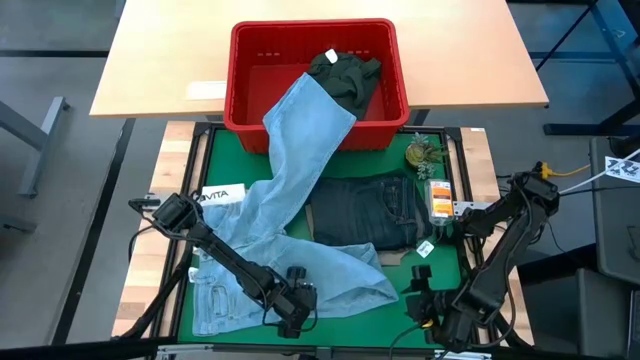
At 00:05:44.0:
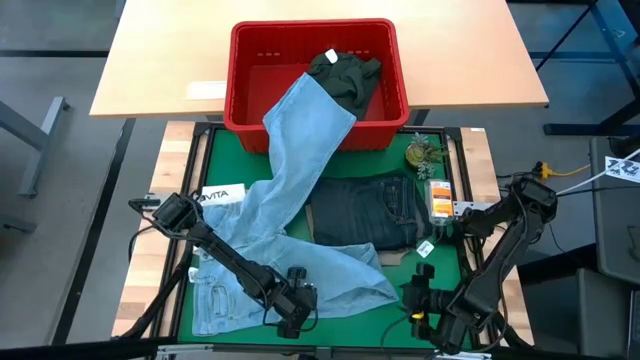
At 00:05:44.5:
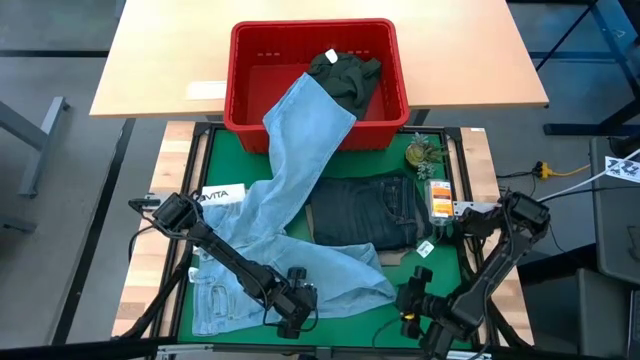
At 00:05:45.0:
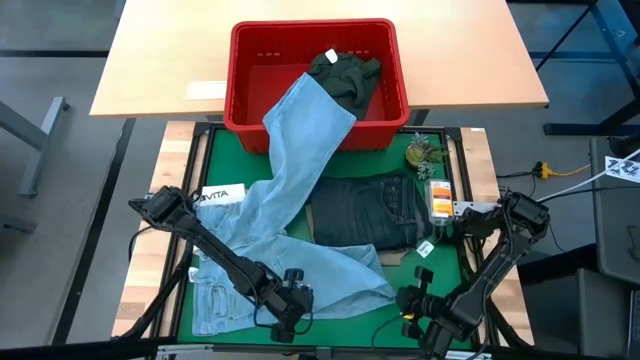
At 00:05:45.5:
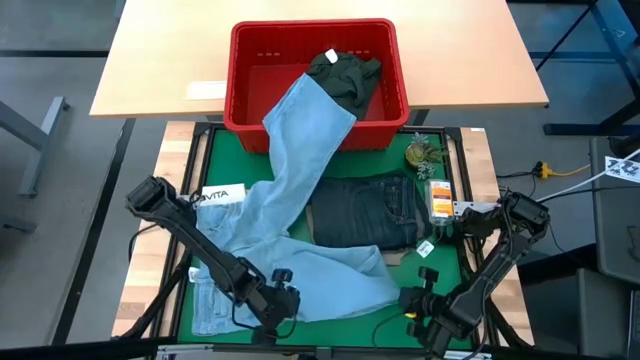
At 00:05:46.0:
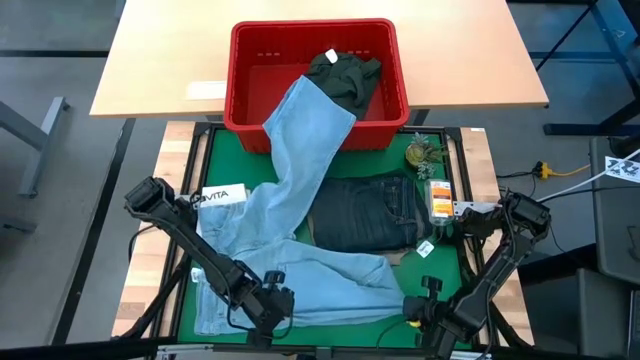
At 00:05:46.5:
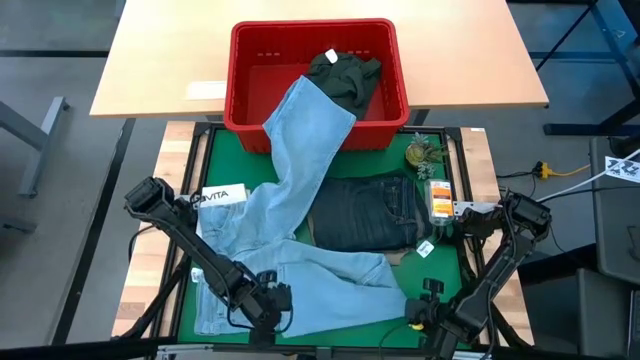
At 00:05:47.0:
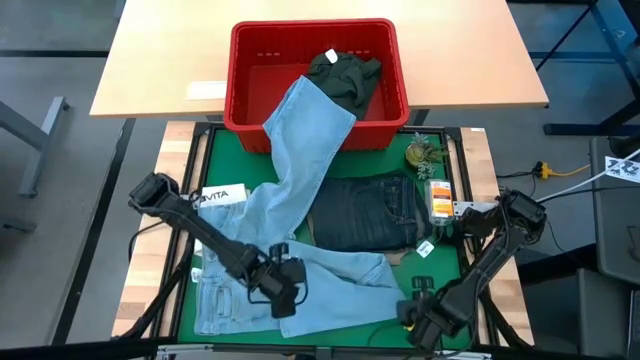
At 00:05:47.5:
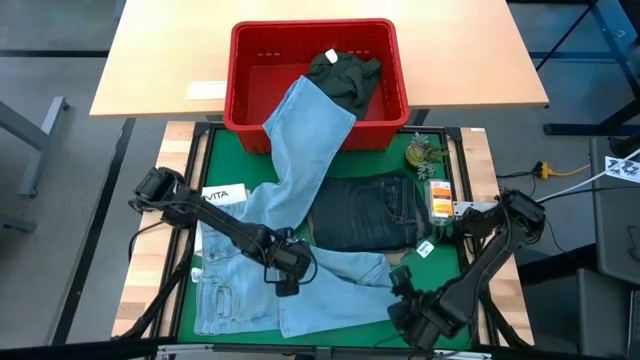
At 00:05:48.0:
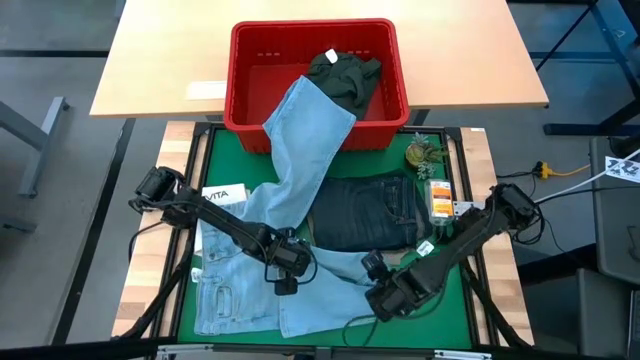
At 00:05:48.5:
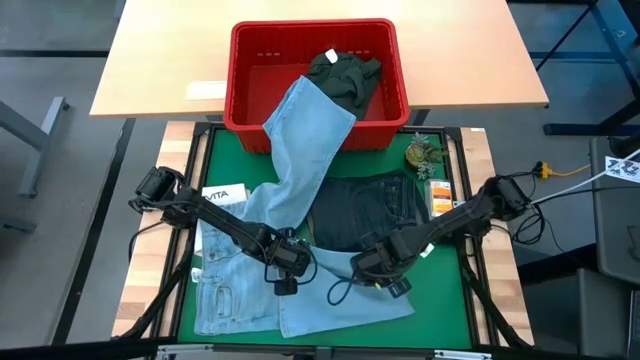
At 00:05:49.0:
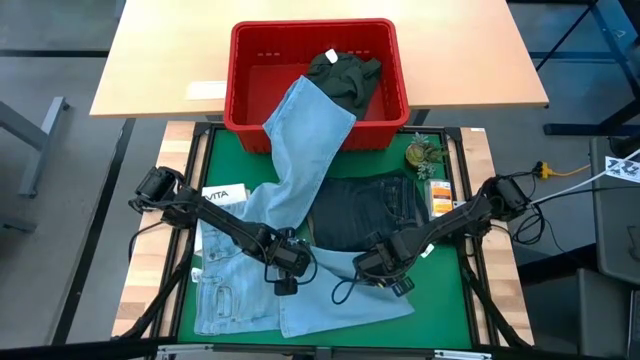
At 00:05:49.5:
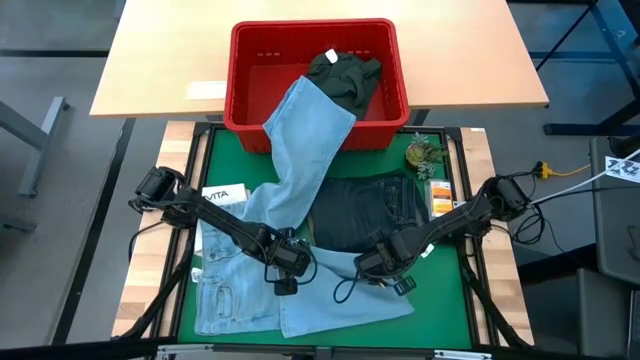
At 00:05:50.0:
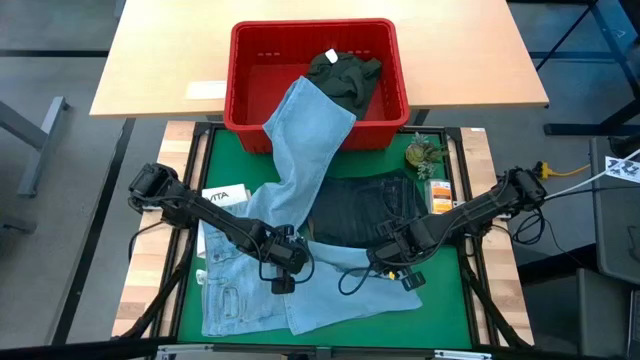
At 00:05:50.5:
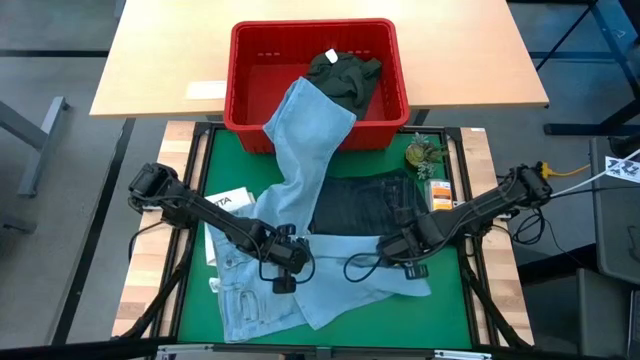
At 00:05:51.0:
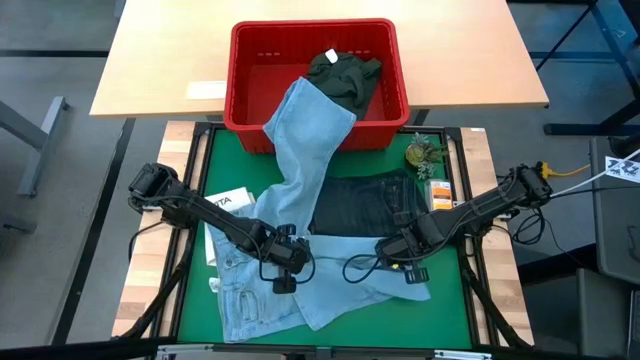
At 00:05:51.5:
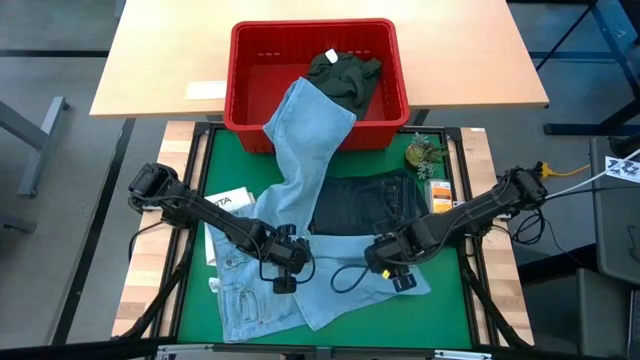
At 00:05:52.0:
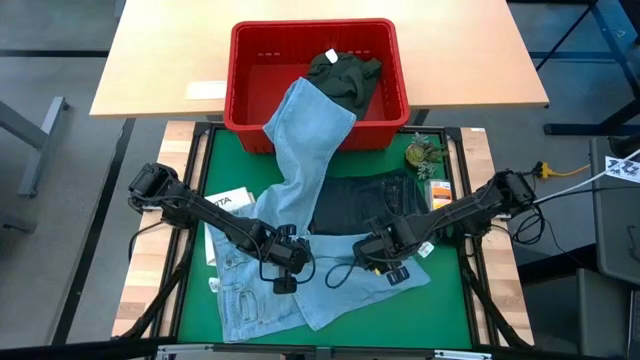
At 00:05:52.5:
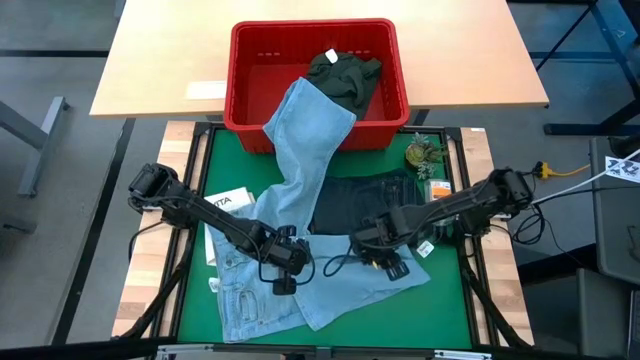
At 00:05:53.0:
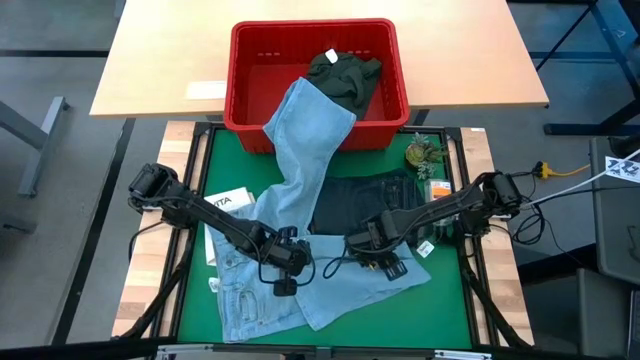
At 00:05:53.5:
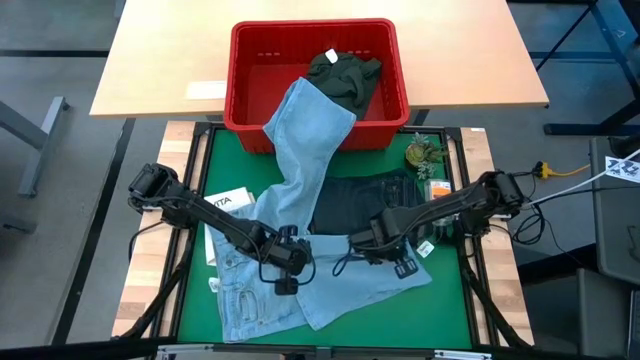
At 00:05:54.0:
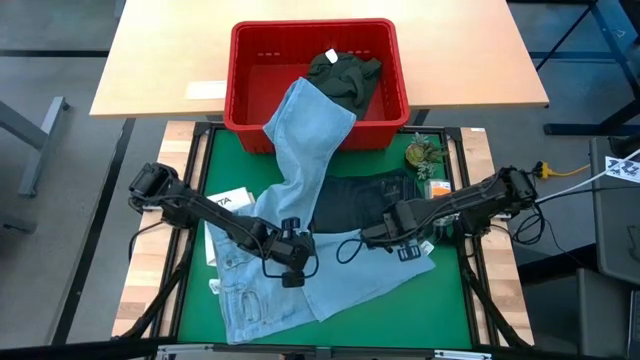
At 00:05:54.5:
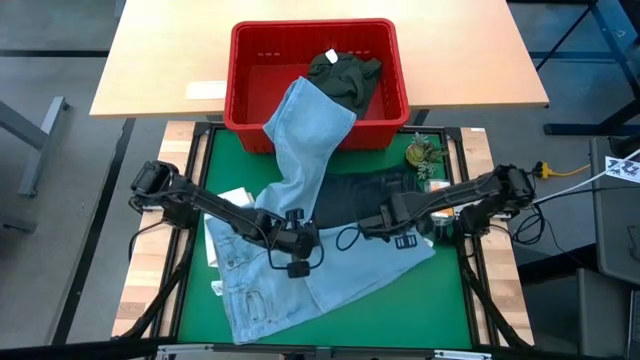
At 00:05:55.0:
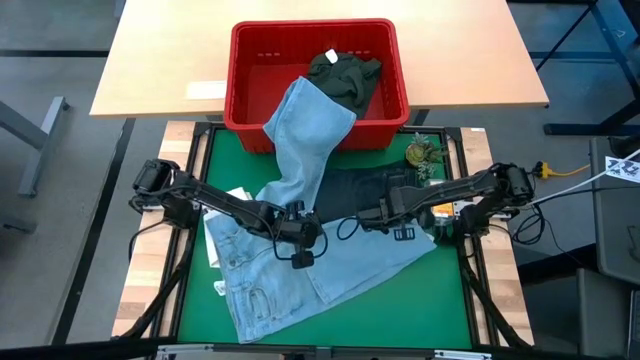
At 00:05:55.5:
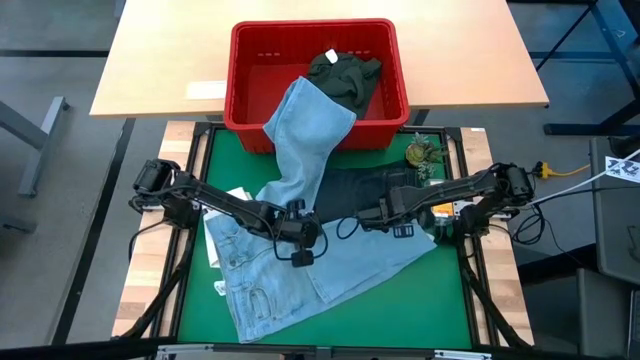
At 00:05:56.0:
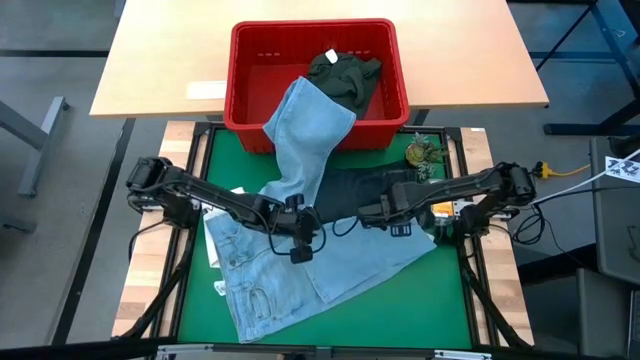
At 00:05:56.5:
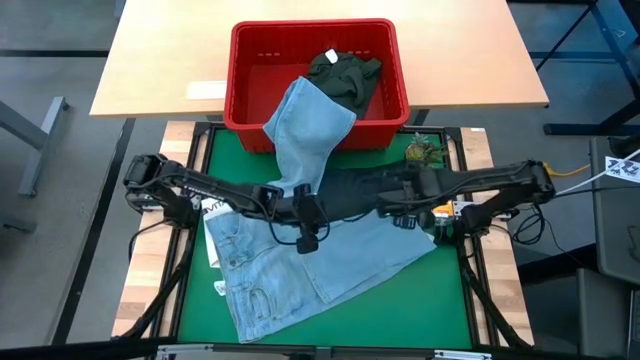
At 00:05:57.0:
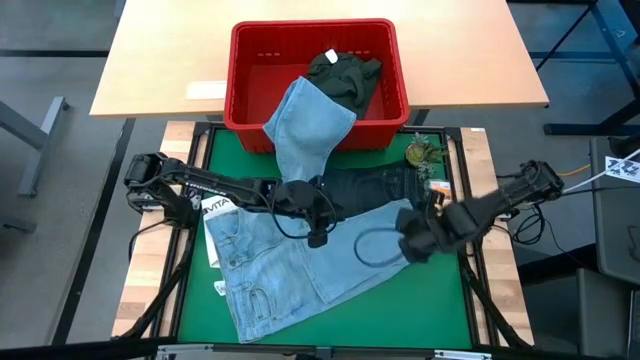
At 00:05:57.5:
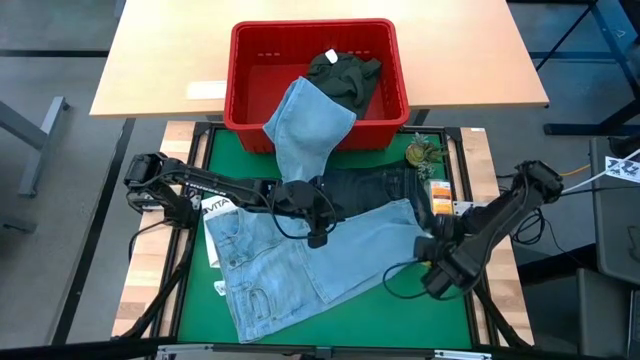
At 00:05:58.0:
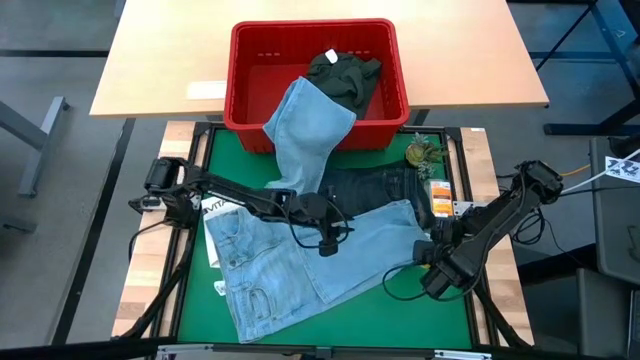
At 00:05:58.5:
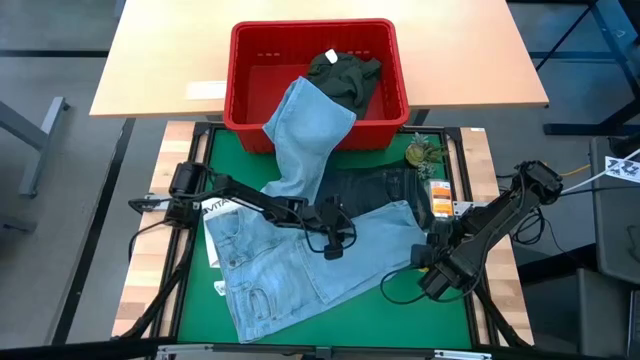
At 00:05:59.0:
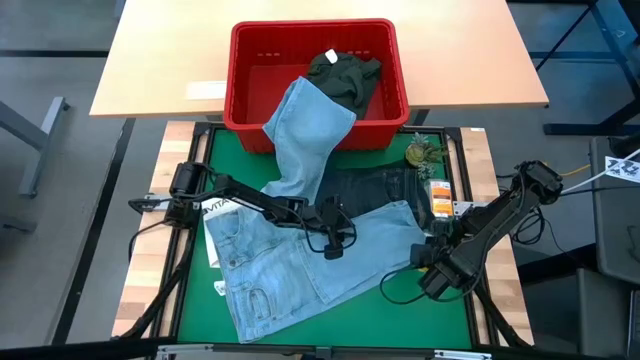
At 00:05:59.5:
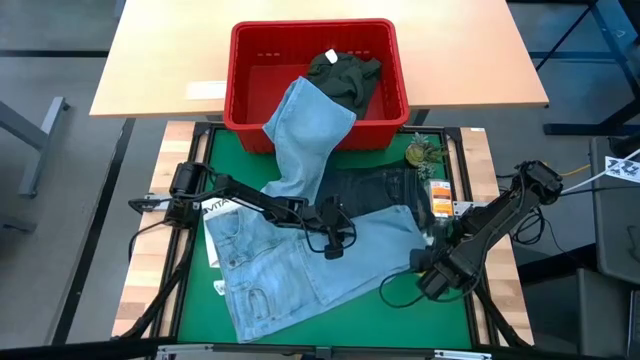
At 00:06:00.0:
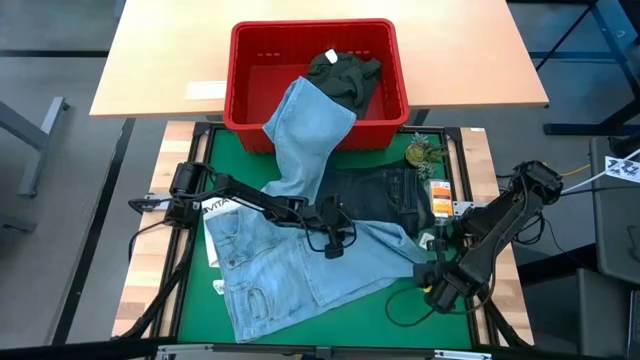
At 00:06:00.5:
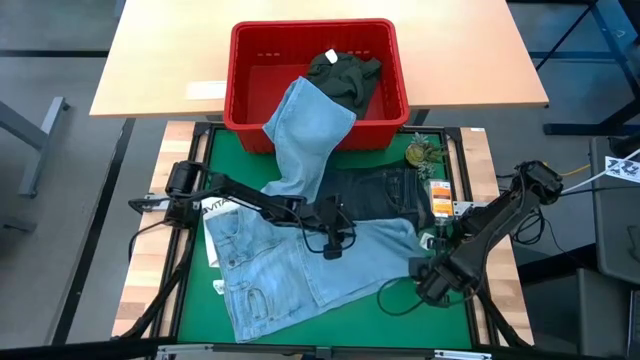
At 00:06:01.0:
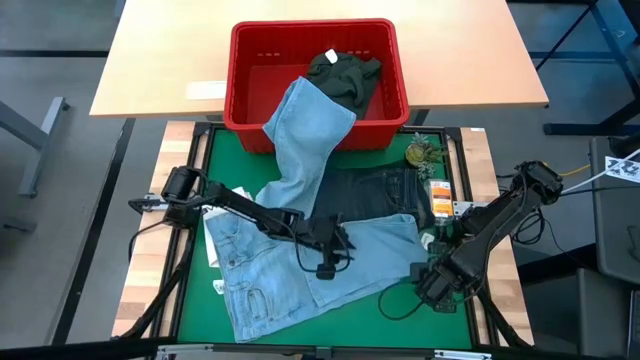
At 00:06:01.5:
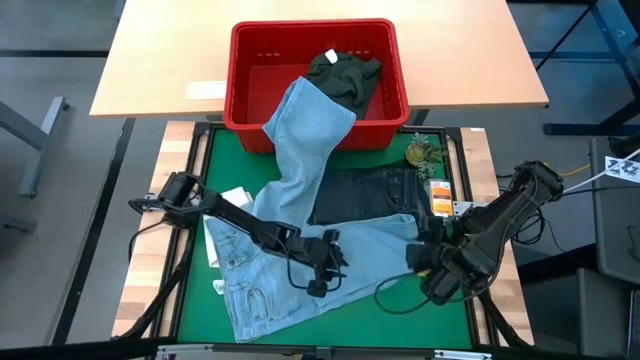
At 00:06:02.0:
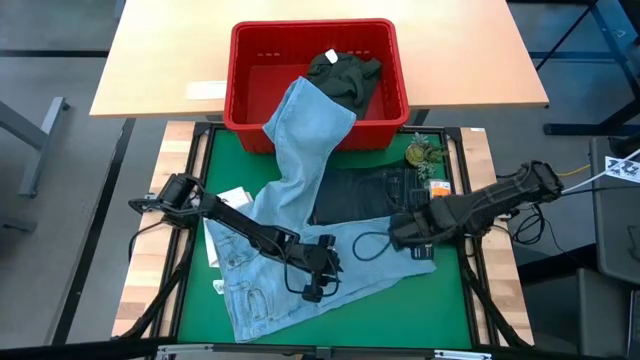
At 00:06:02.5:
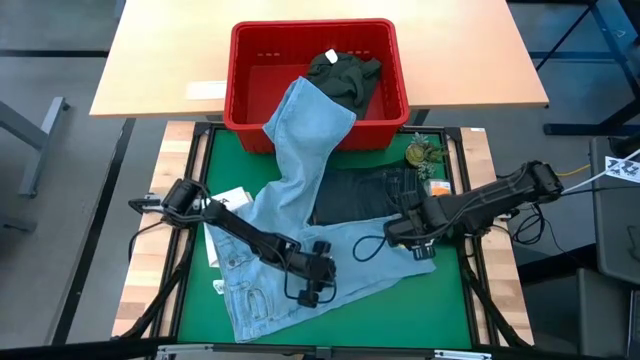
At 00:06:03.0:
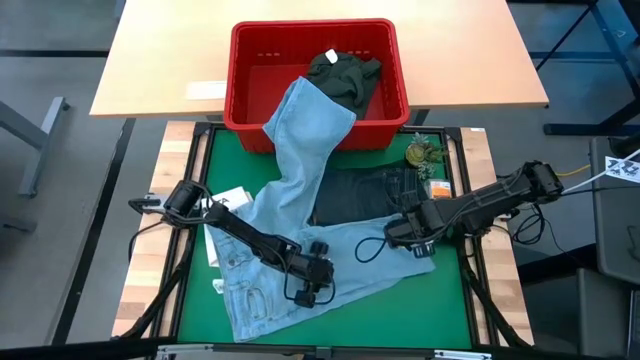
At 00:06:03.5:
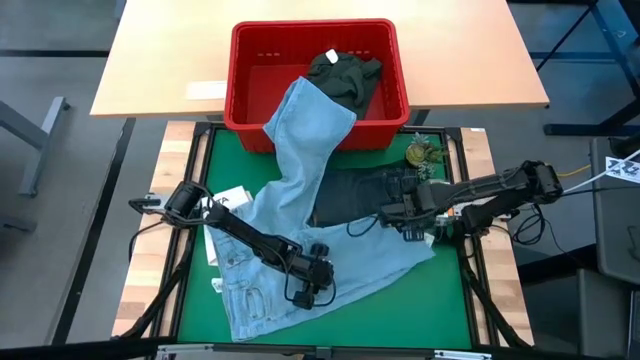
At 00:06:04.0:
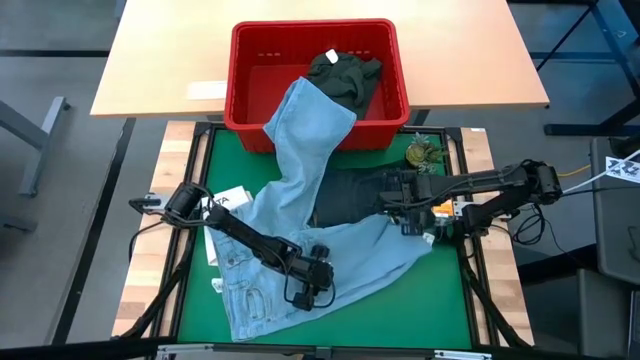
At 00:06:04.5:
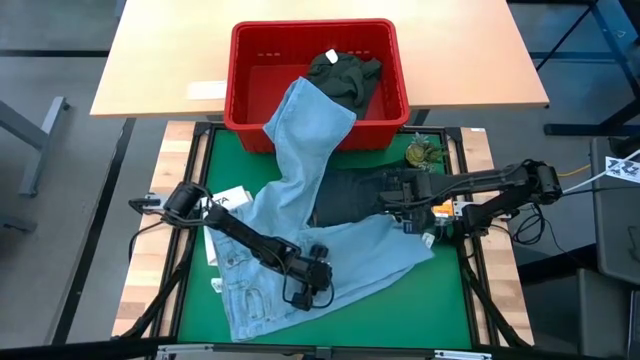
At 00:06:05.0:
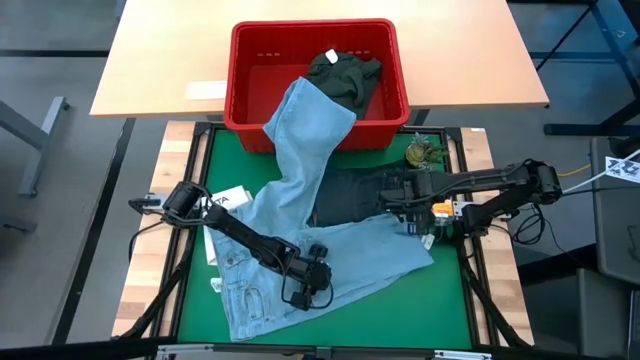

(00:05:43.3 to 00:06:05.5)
Task: Fold Laundry from Bin
Fold the light blue jeans
